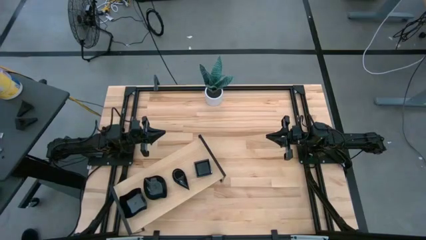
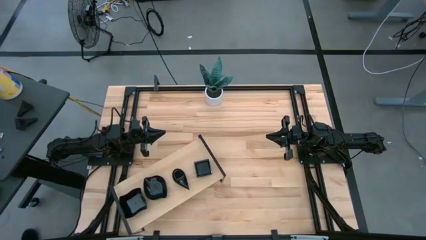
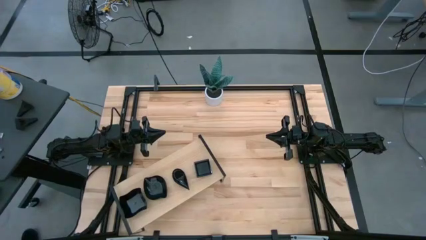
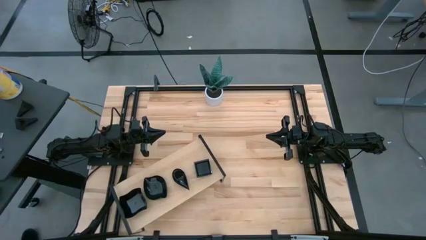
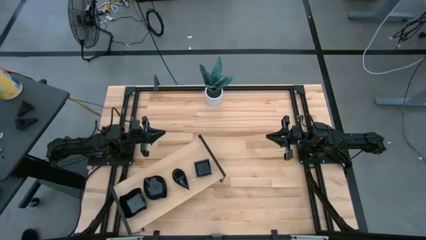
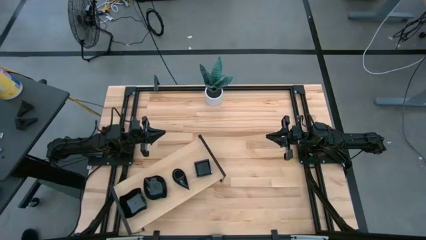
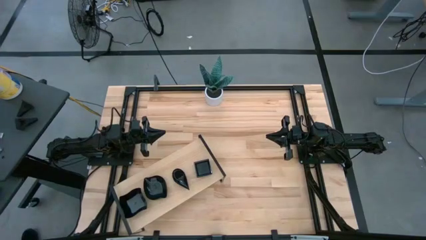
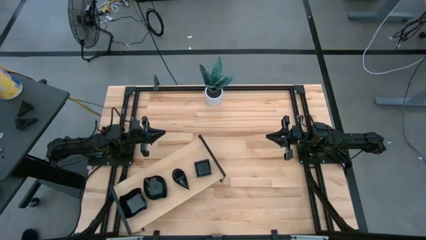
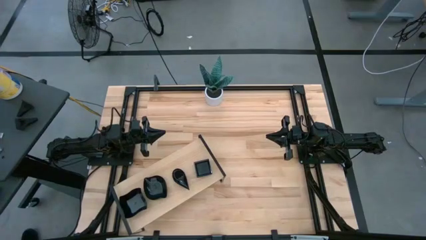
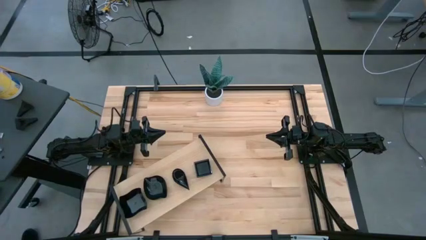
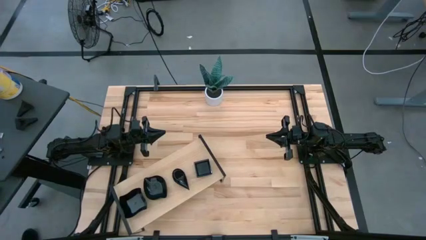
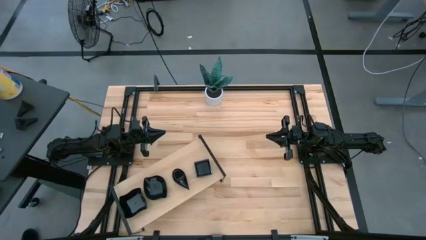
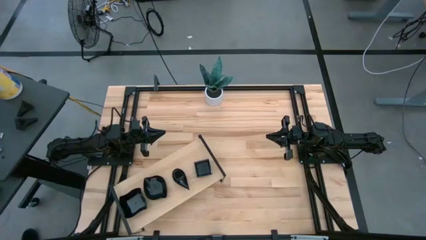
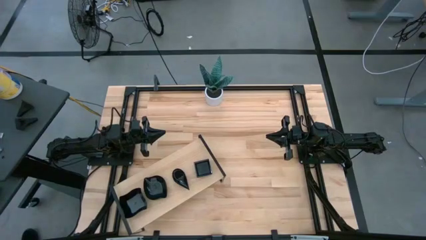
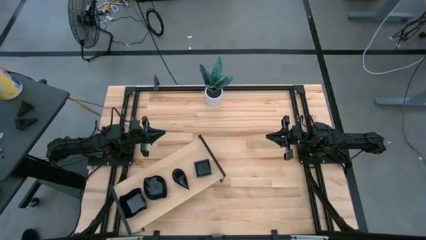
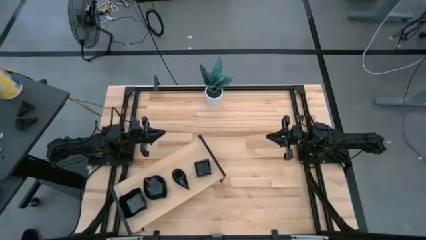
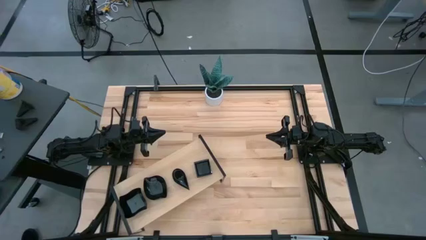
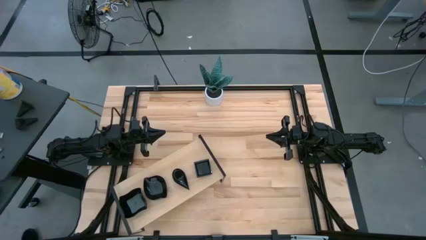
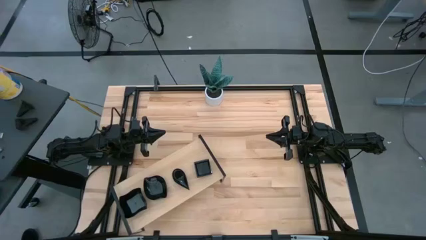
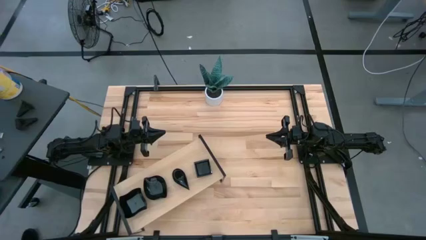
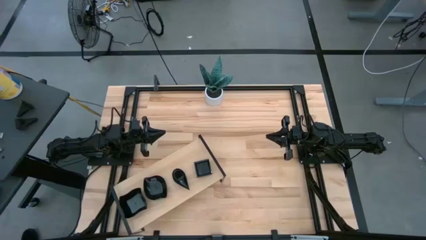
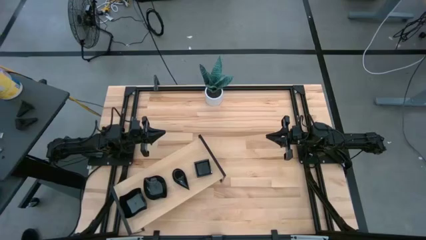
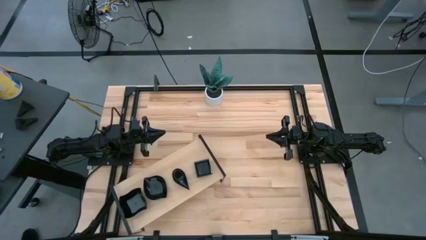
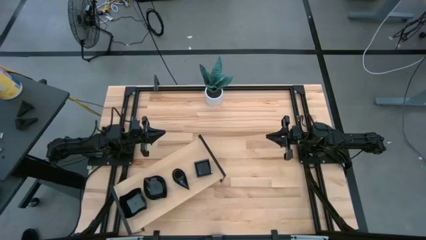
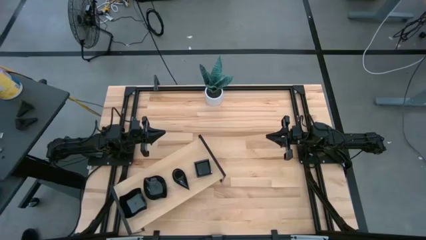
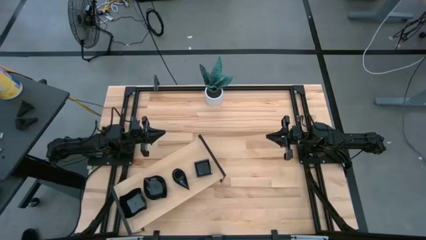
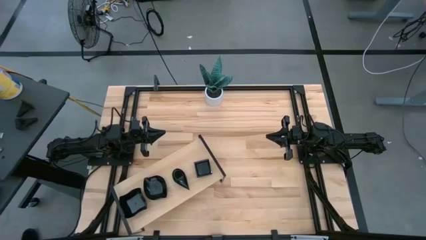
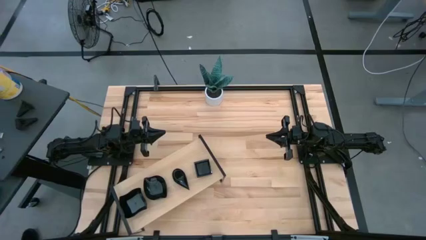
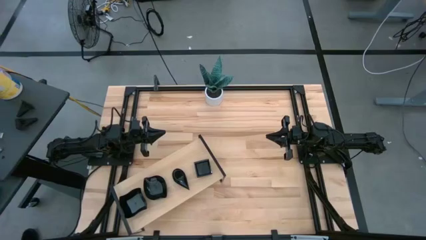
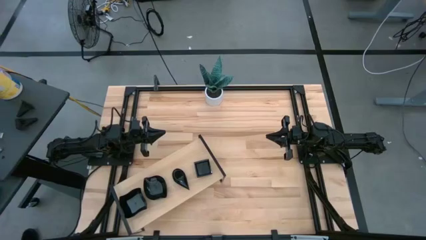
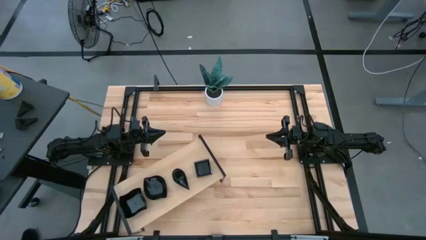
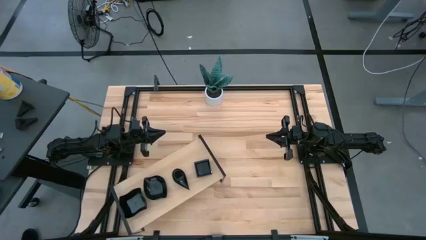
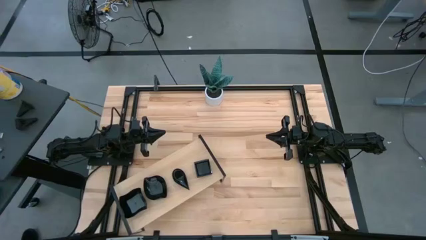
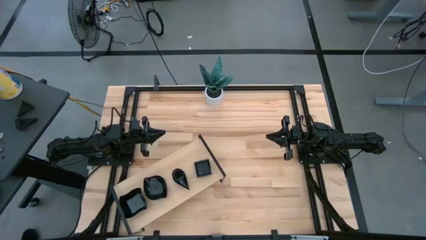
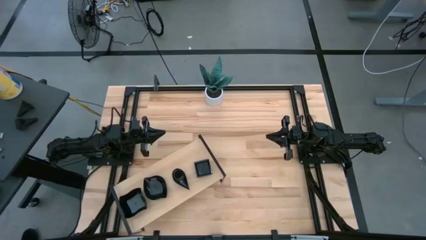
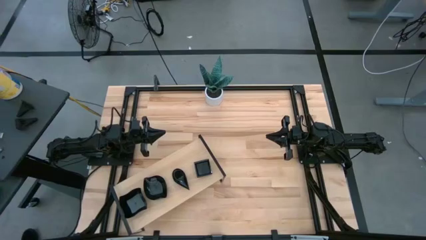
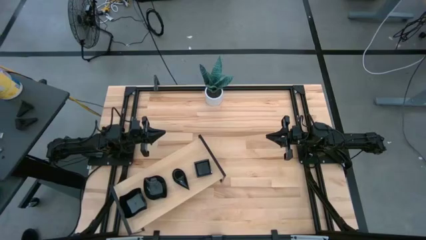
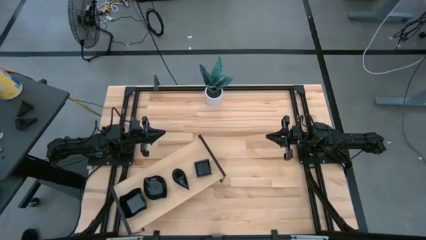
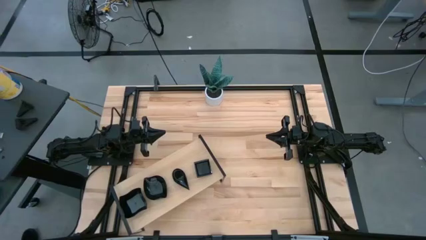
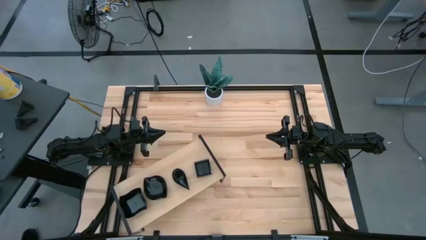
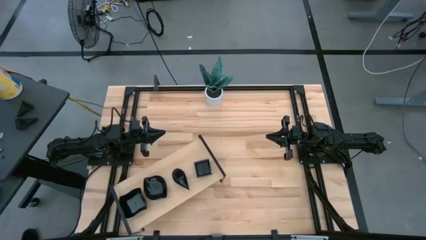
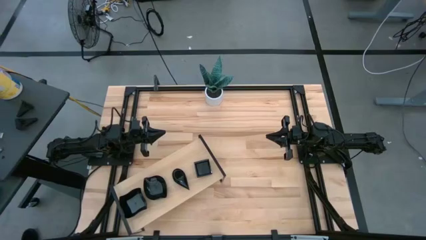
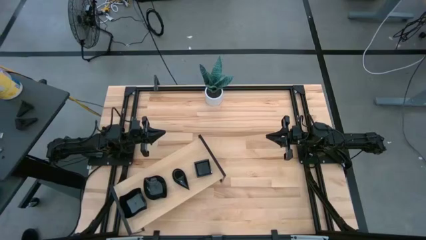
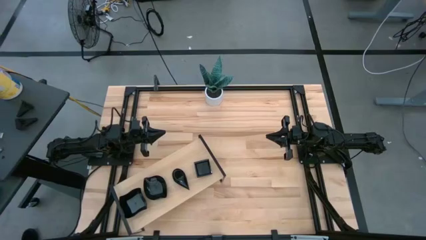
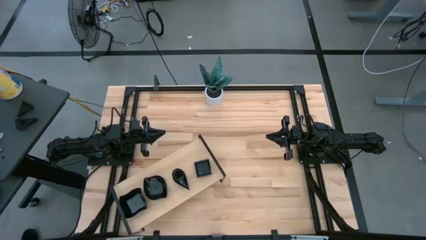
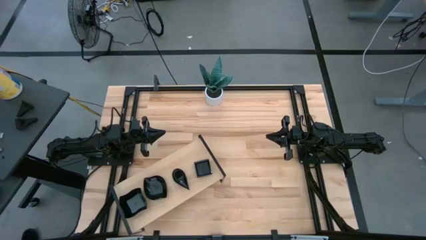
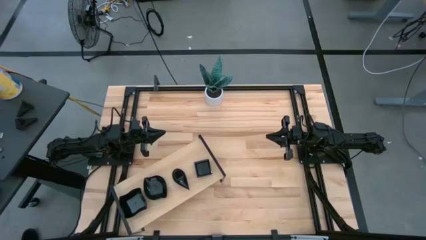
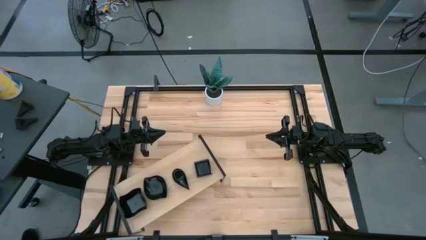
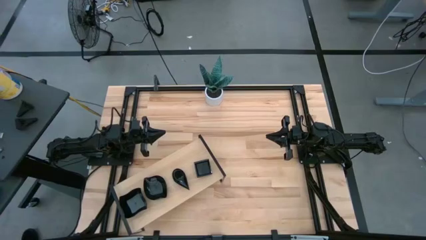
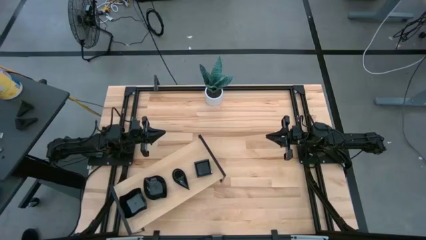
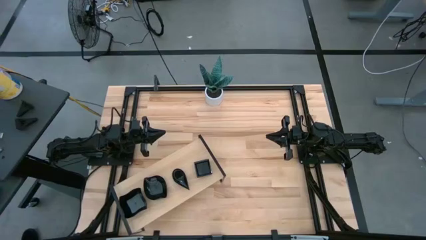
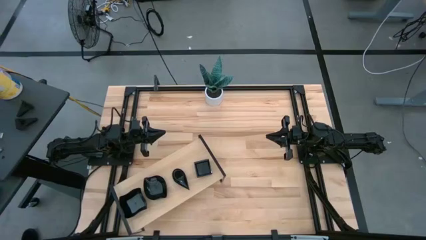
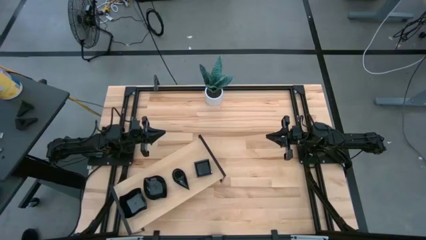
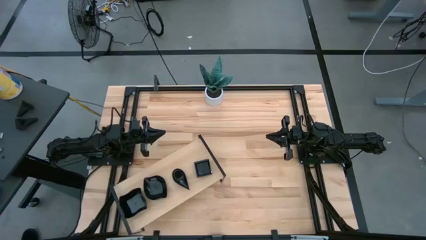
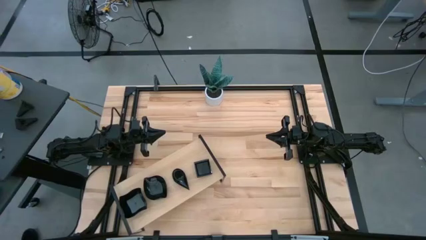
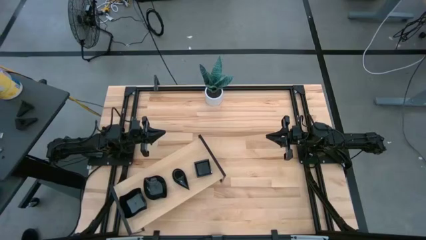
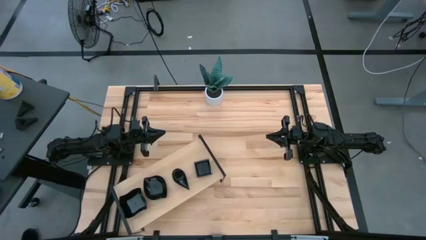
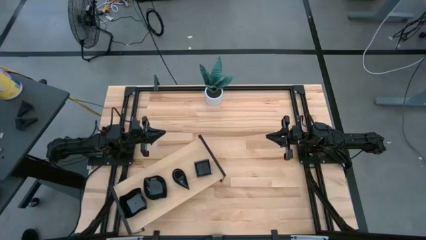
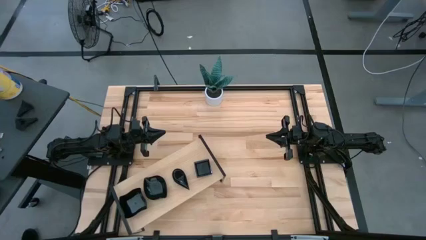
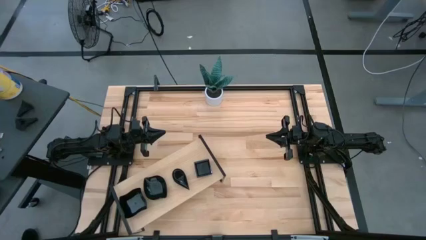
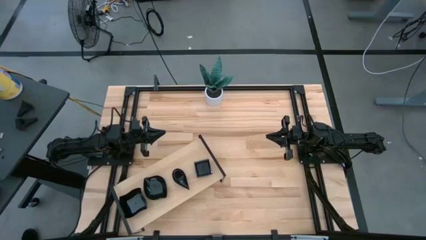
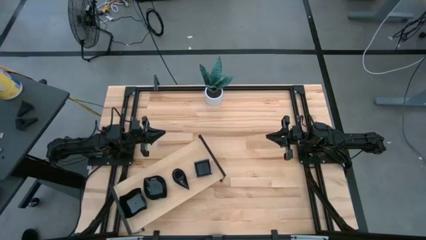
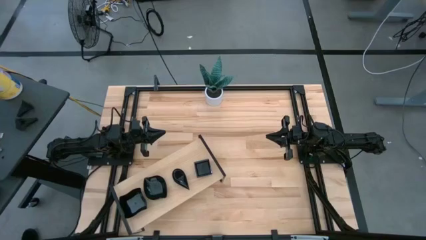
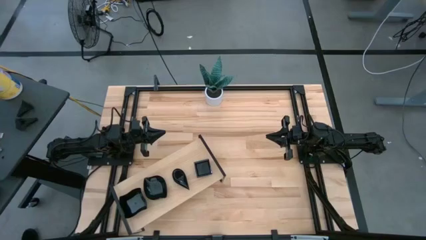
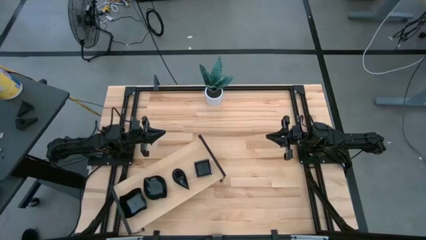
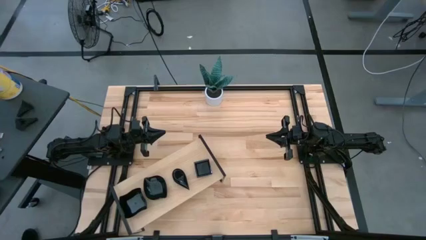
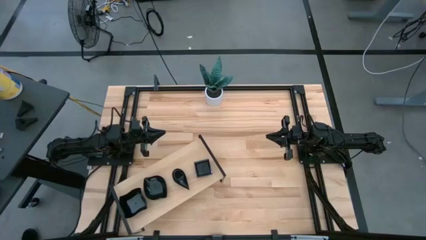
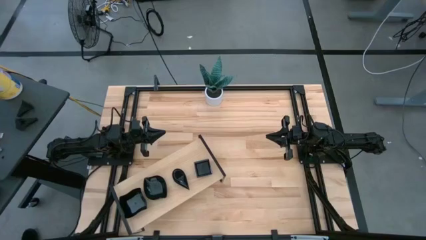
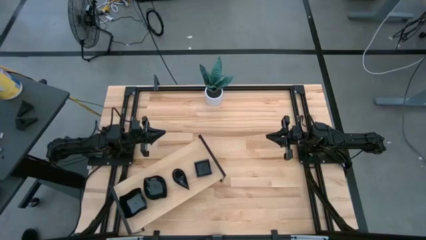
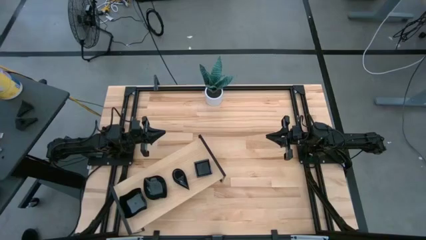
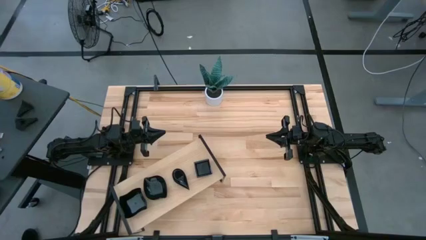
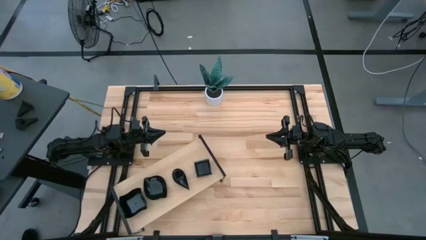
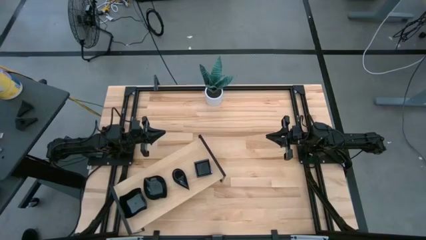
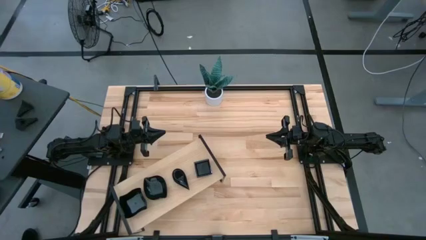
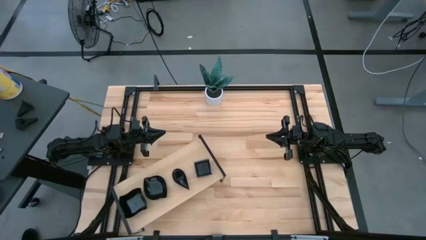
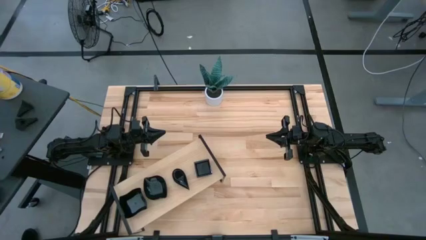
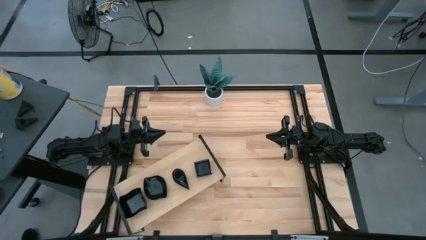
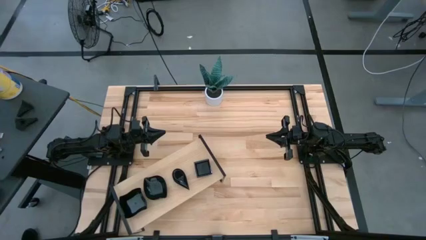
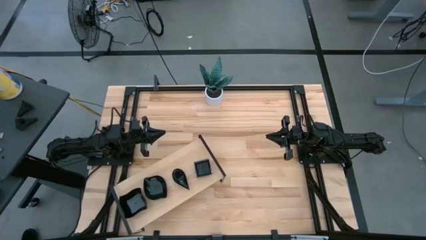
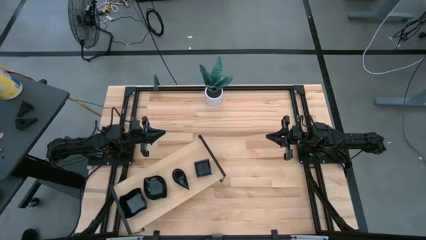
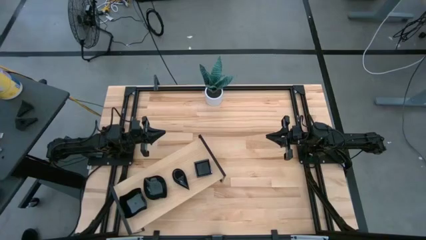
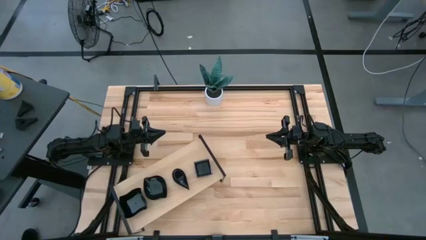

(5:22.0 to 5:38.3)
Task: Pick & Place Mini shaped plates
Return to Home Position
